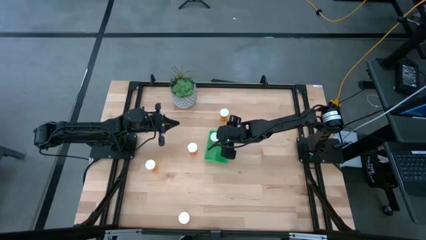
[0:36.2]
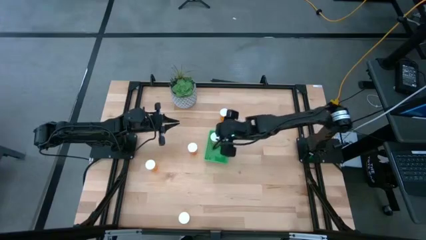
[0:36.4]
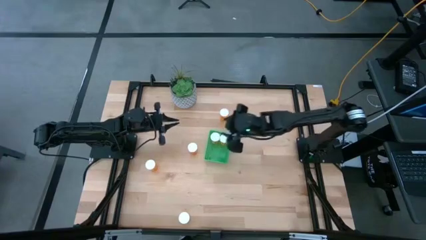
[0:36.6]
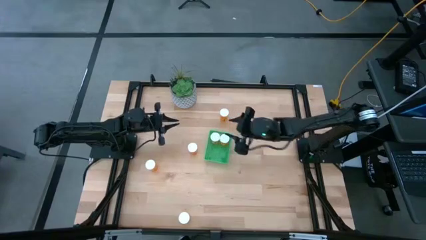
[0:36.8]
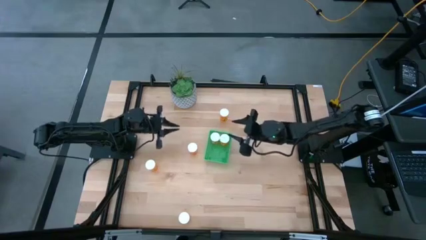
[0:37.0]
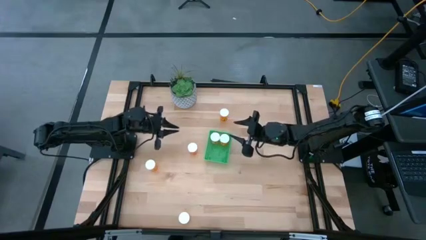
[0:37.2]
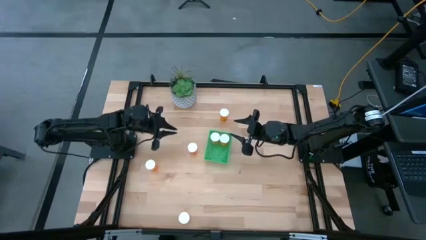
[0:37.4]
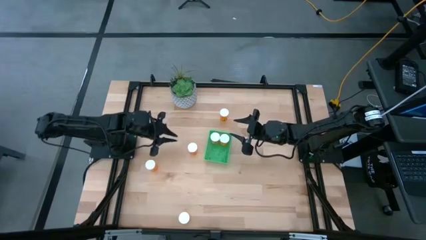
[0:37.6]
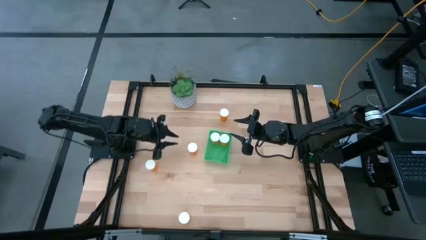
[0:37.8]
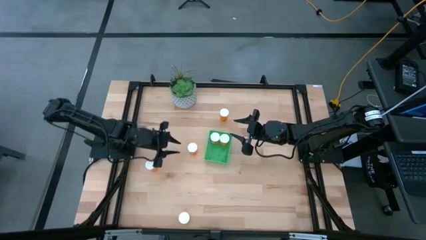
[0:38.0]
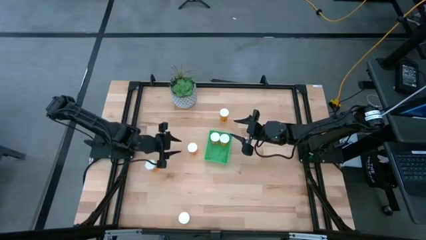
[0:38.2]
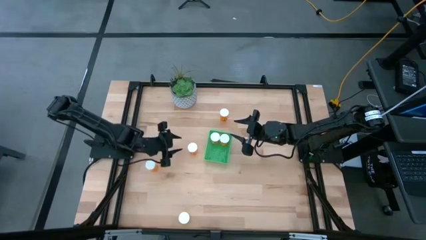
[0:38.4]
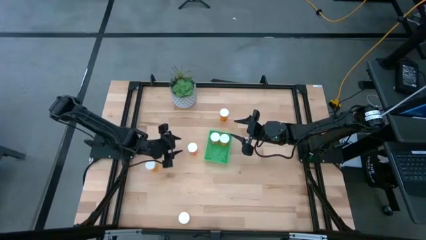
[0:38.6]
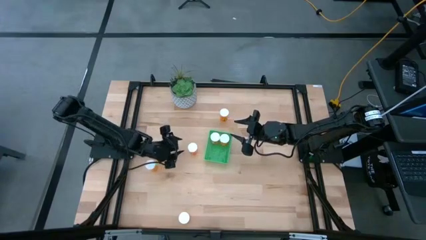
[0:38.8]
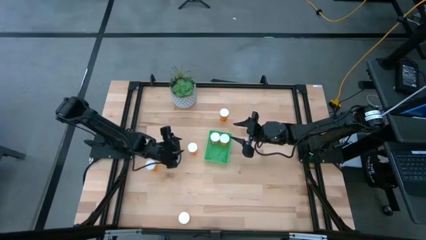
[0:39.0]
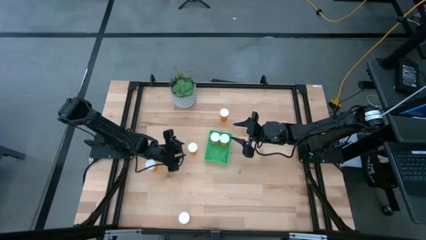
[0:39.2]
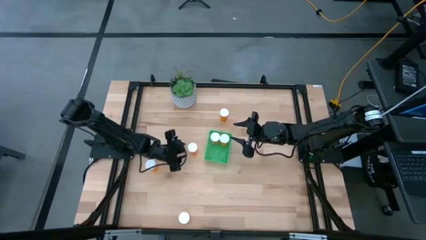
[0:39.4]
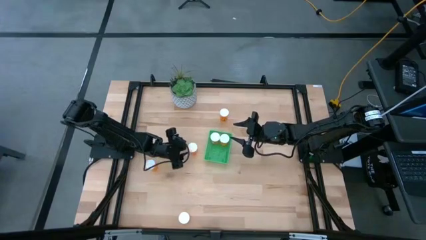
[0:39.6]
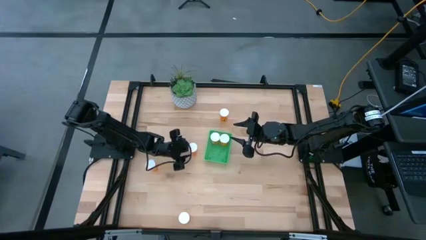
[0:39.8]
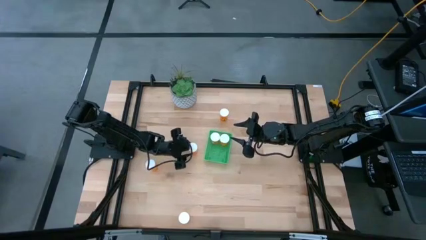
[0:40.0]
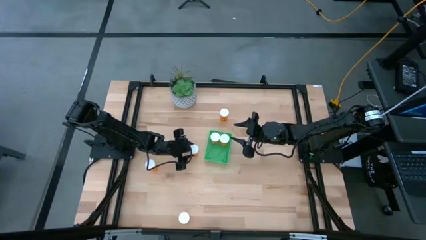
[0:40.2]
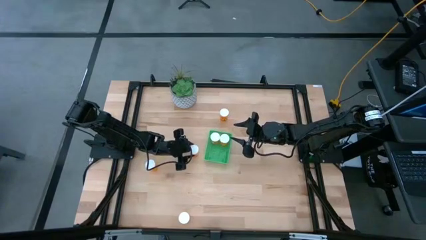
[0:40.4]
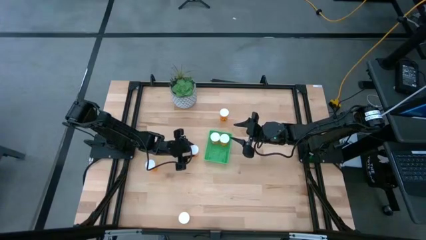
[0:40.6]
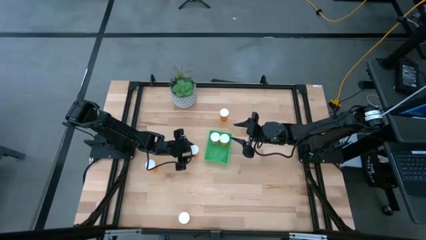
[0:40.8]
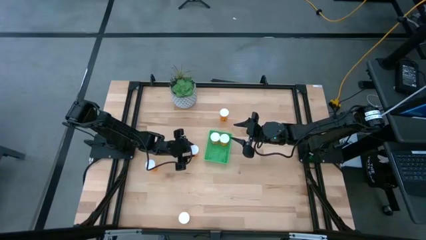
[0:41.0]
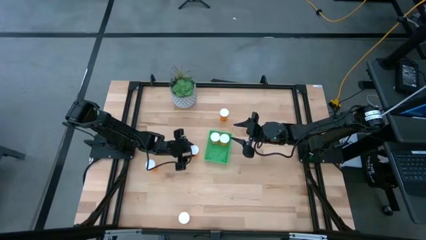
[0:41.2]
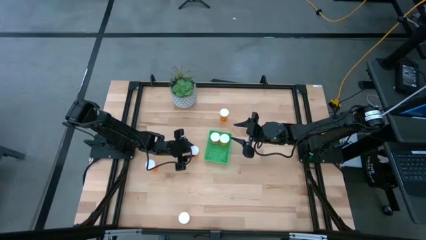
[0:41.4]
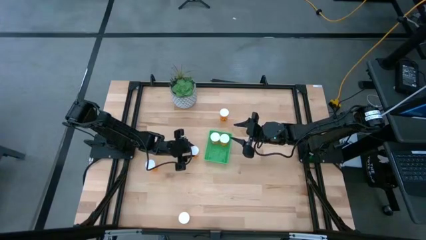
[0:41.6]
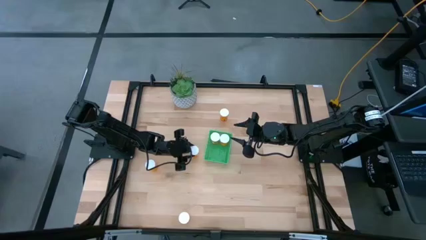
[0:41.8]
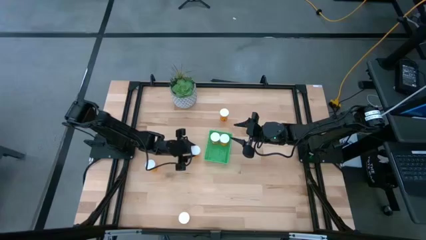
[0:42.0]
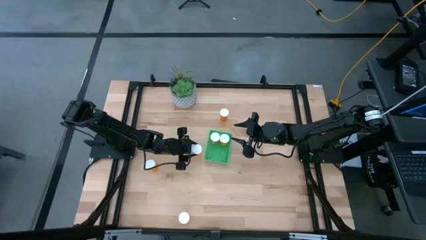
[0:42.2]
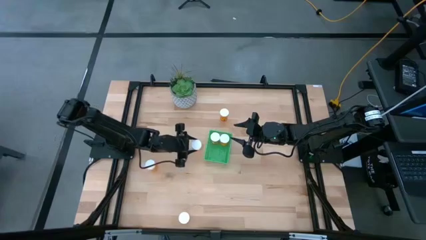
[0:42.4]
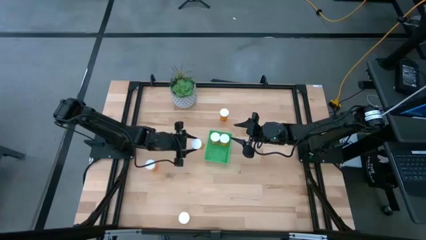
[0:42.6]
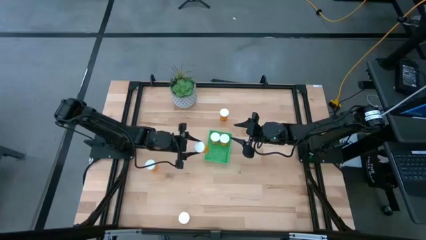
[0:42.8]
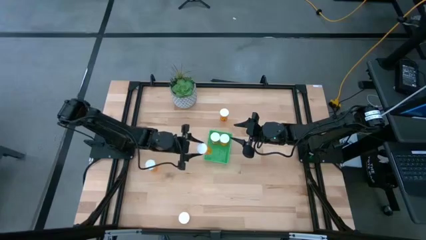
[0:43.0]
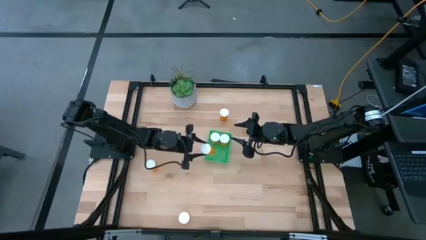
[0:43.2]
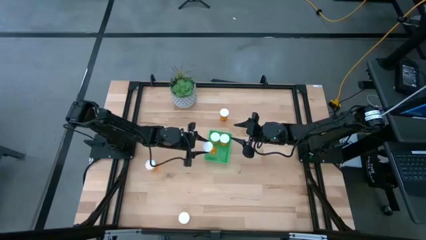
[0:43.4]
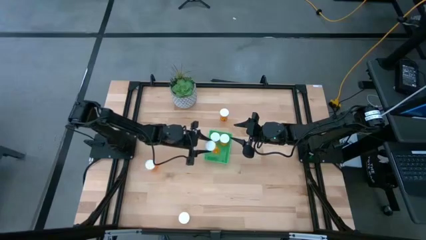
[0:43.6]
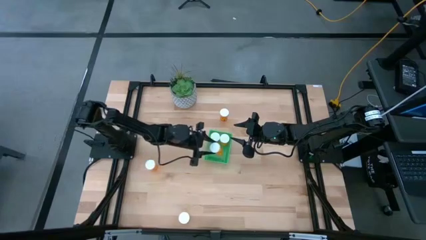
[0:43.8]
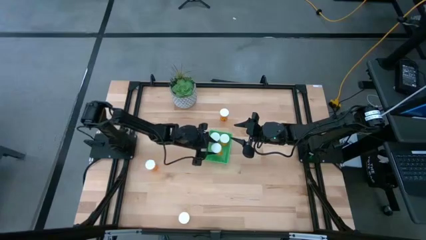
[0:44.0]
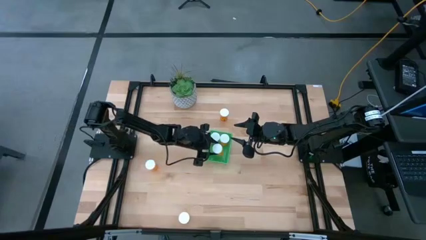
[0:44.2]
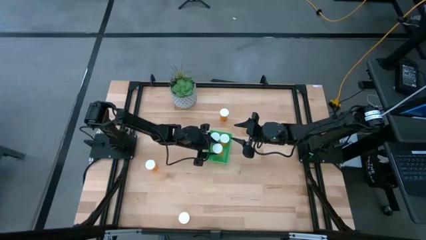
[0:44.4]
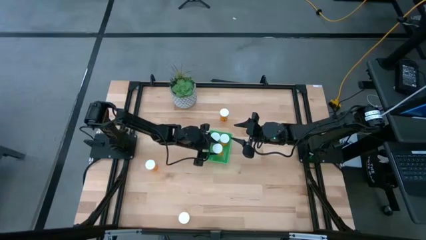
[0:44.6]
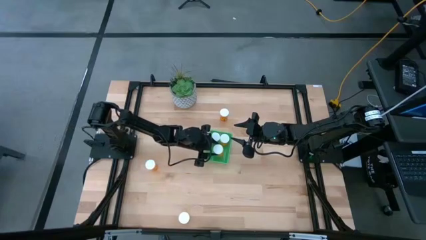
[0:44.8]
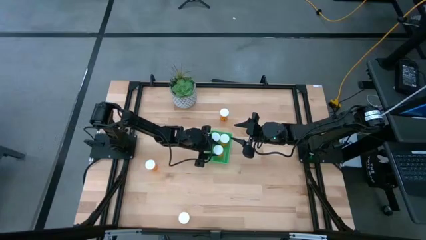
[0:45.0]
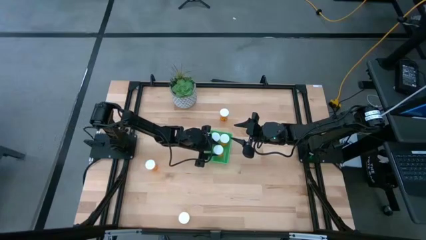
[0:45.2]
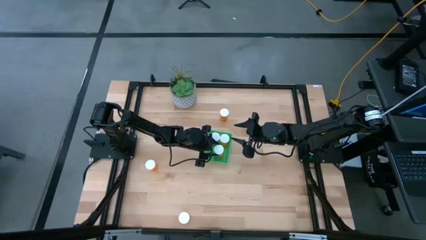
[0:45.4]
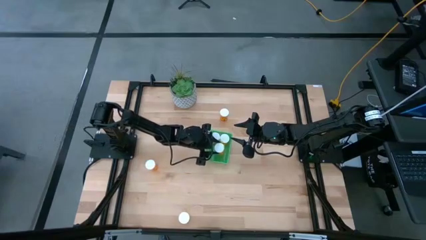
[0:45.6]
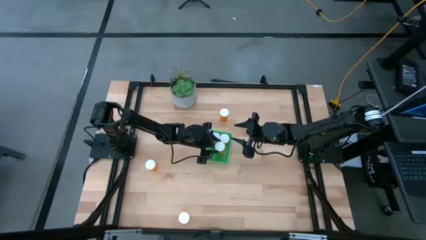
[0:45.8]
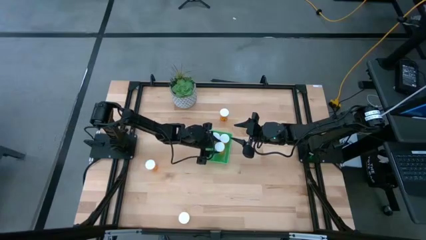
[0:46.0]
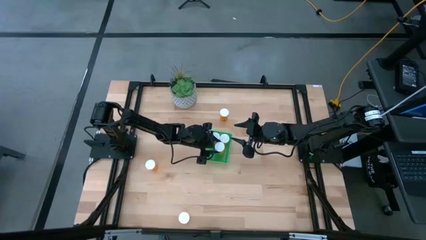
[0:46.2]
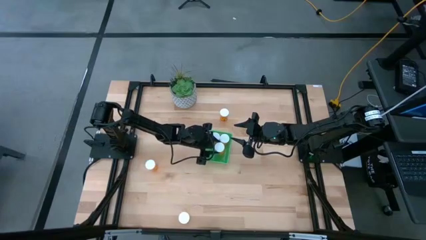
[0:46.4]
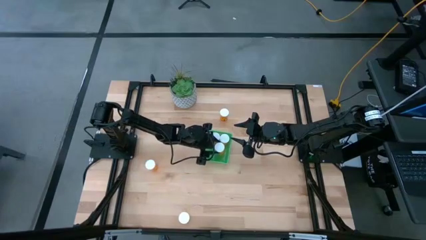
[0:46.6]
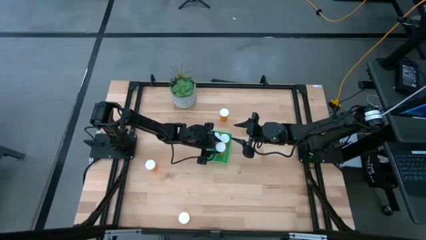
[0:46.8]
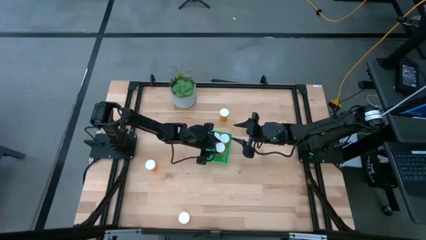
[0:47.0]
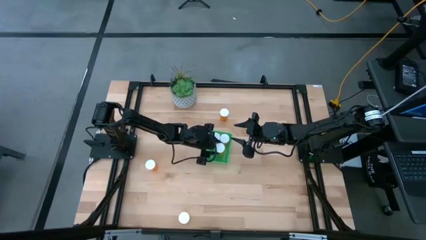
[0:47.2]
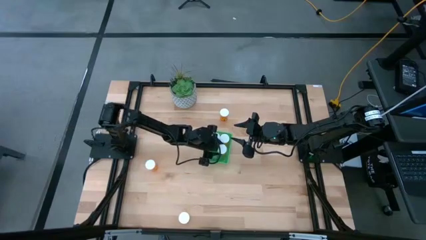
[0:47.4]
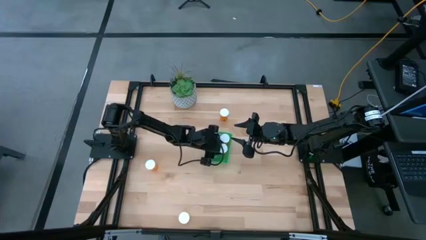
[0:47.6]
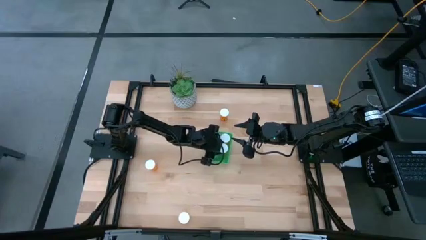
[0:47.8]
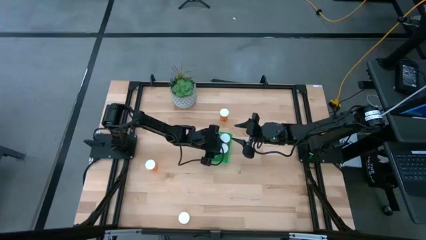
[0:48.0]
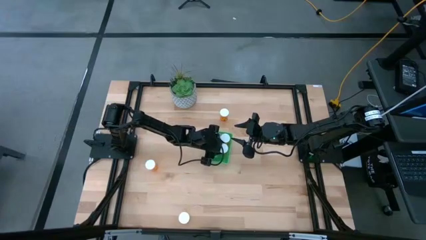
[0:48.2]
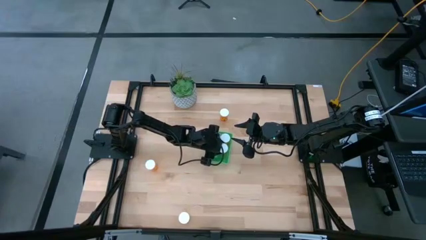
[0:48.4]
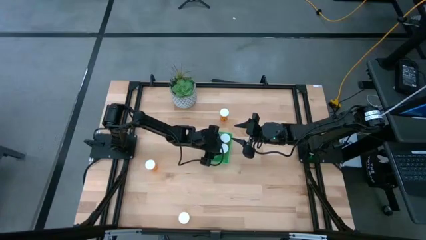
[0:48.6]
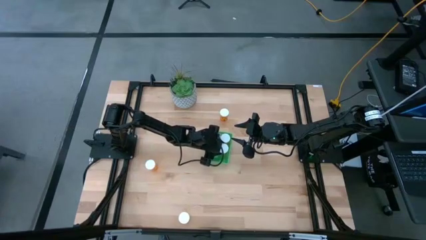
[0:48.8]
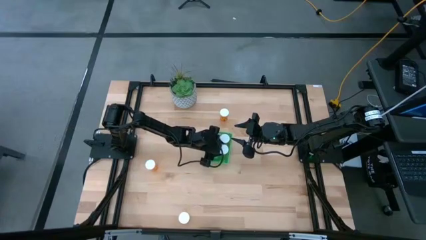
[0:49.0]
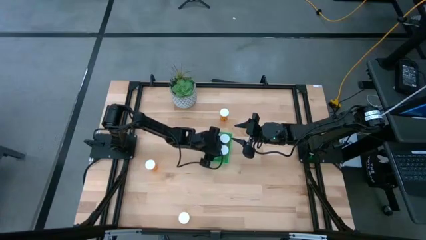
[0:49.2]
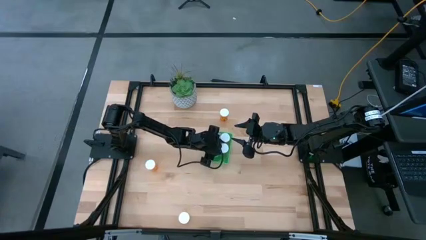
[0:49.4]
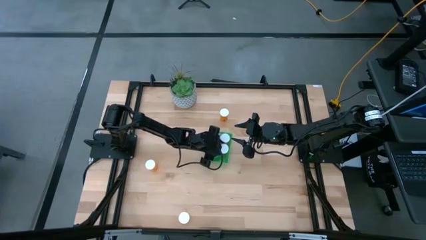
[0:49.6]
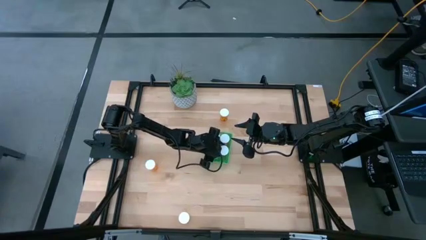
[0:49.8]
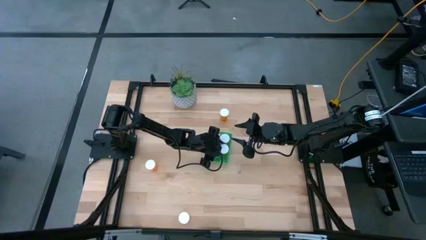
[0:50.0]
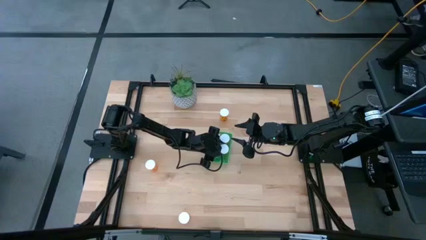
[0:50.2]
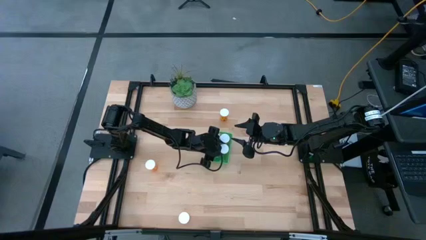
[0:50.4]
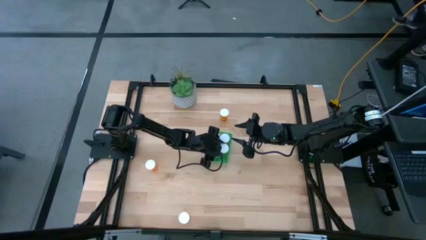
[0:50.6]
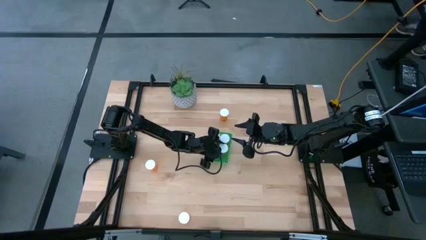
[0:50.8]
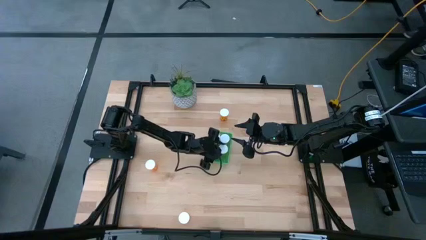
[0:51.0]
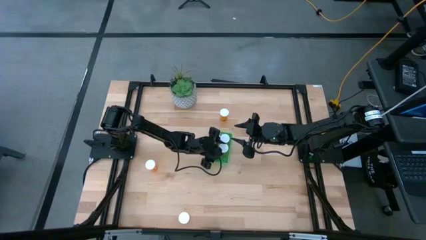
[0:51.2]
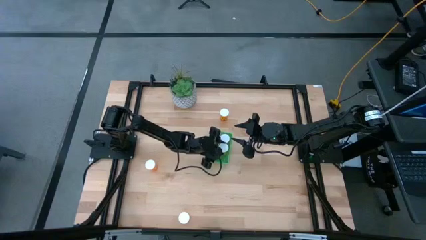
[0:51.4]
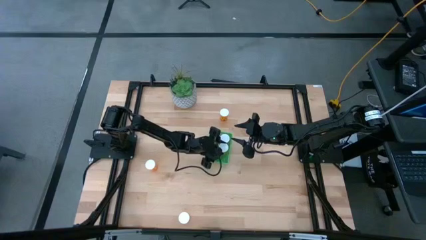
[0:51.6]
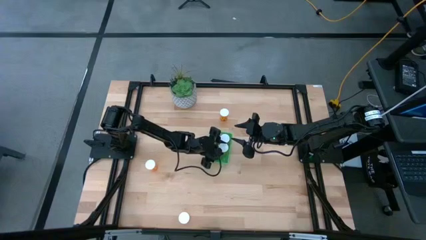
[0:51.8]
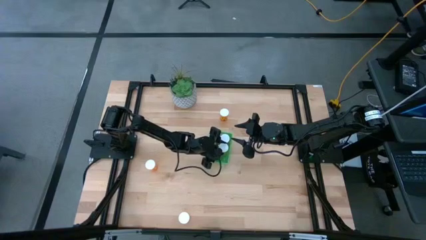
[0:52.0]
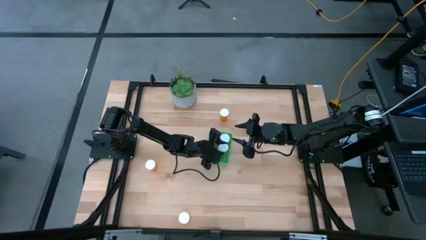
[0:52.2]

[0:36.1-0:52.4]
Task: Pick and place pill bottles into a basket
Put the orange pill bottle into the green basket

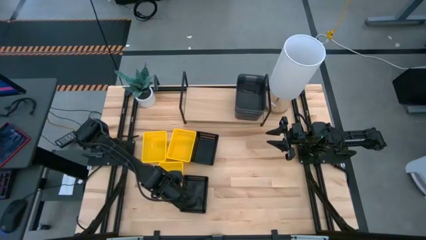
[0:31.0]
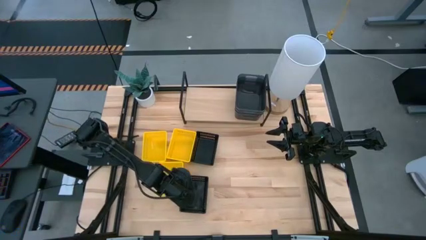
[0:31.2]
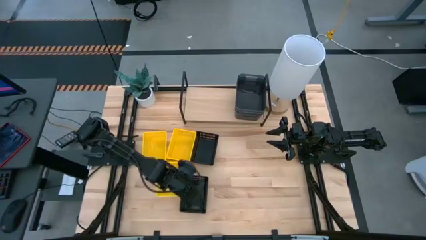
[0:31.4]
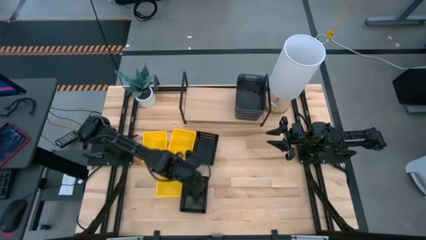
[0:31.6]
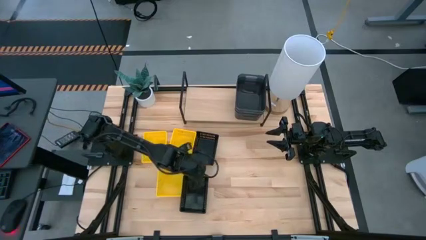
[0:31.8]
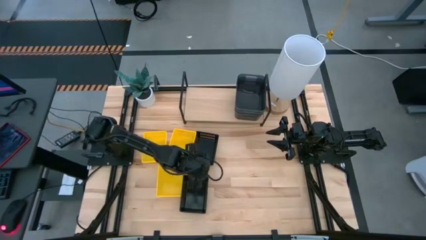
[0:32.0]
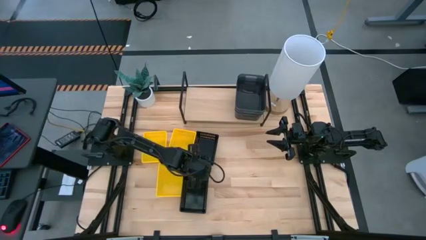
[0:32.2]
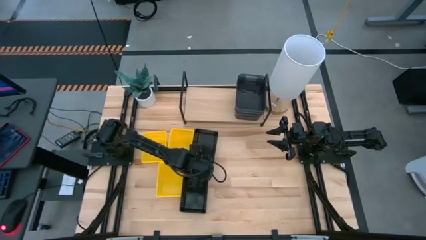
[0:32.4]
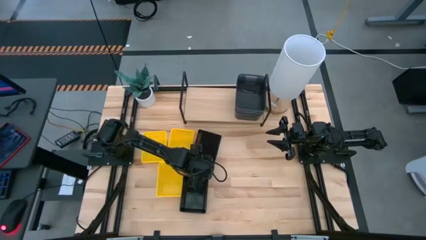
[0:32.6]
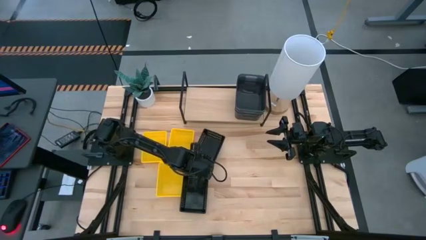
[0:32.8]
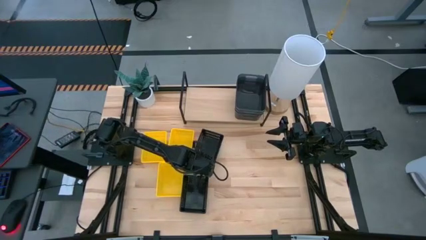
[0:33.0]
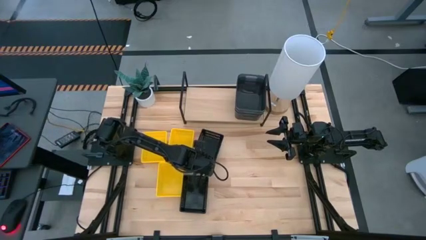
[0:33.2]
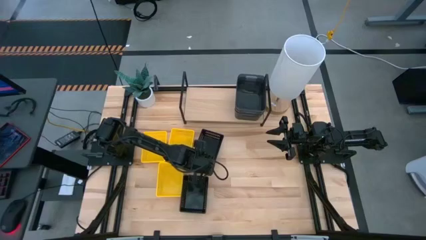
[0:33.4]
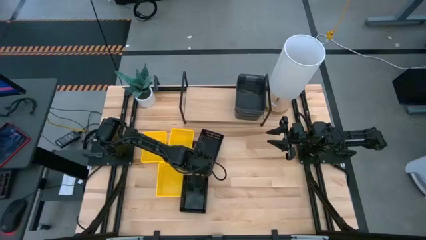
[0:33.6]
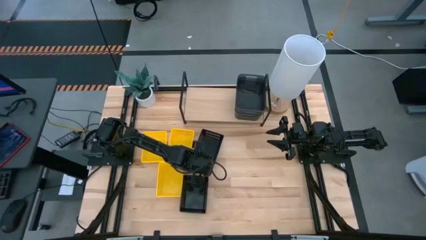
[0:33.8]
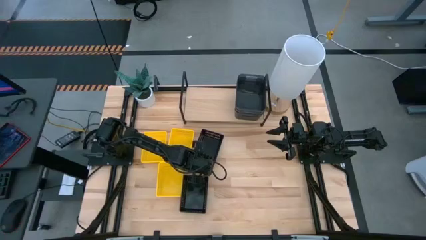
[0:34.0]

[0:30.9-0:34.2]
Task: Stack baskets on shelf by color
Stack the top black basket on the black basket
